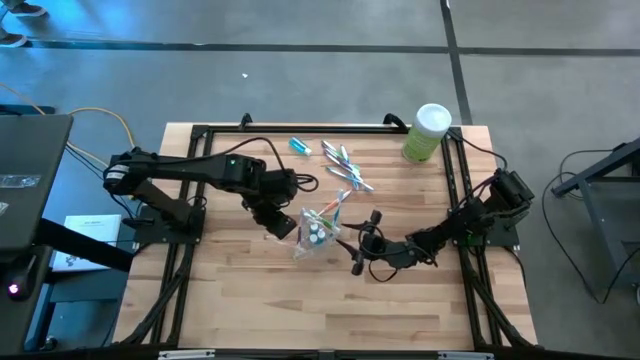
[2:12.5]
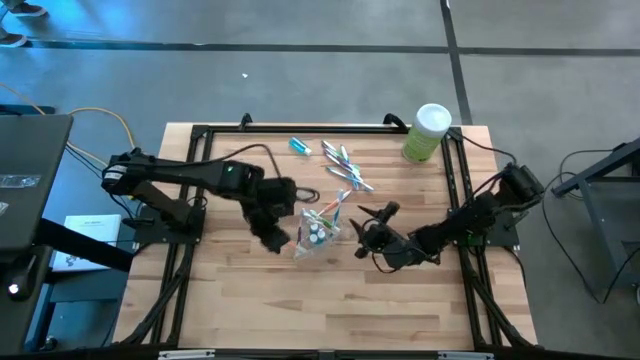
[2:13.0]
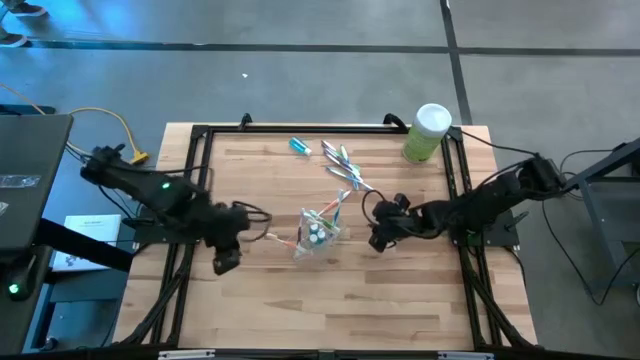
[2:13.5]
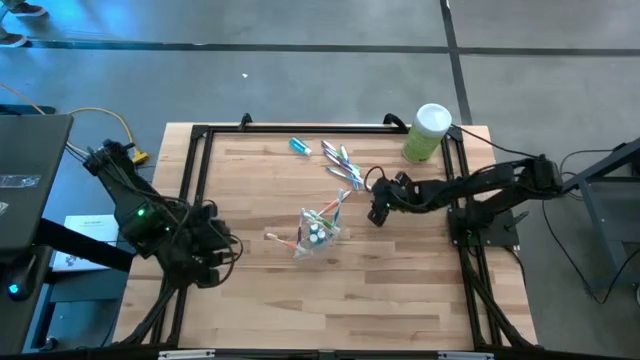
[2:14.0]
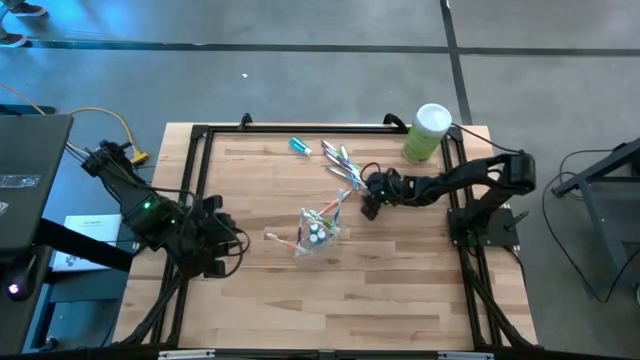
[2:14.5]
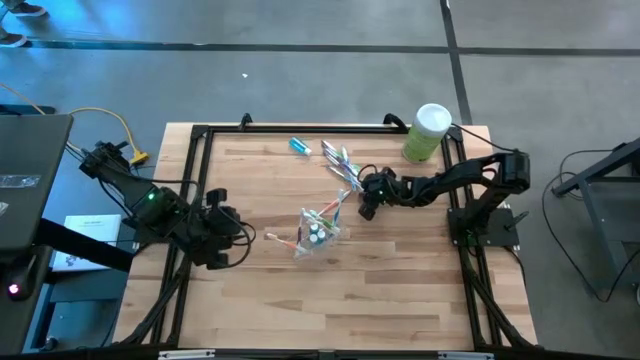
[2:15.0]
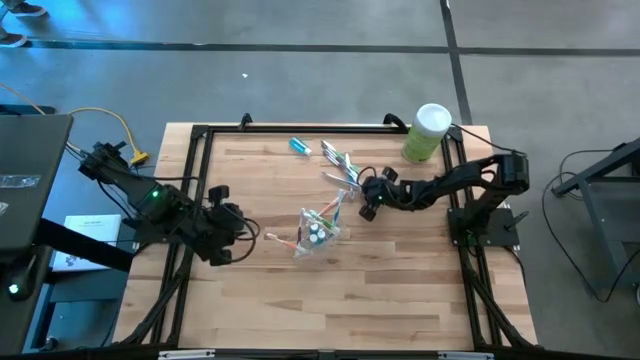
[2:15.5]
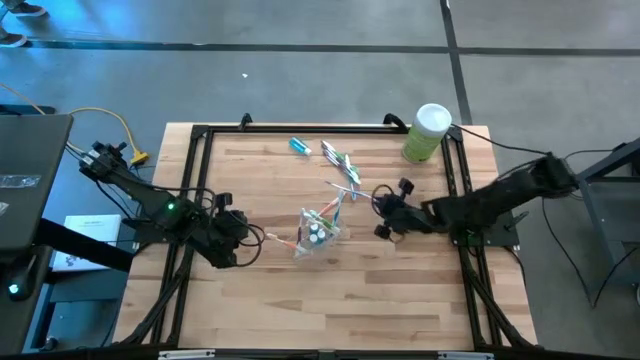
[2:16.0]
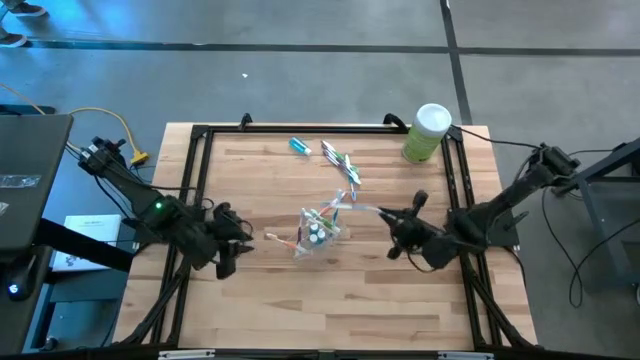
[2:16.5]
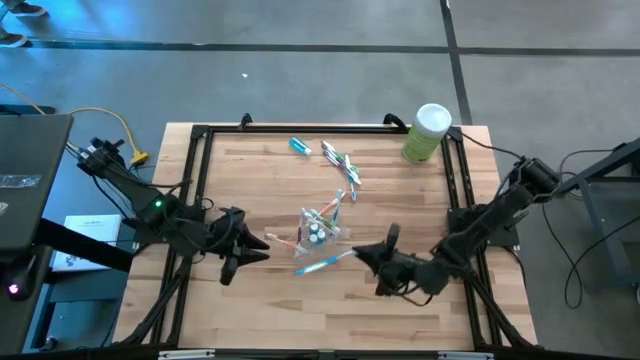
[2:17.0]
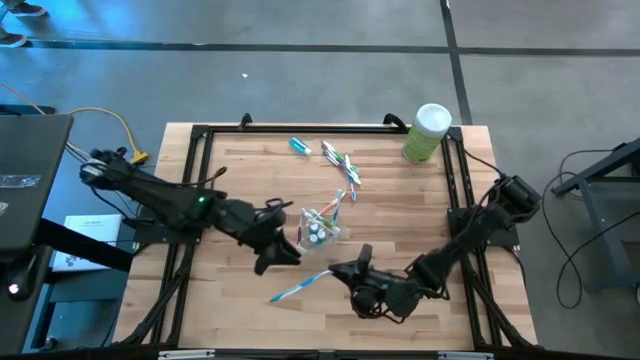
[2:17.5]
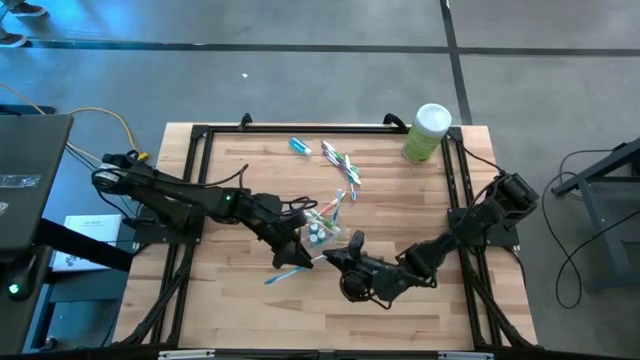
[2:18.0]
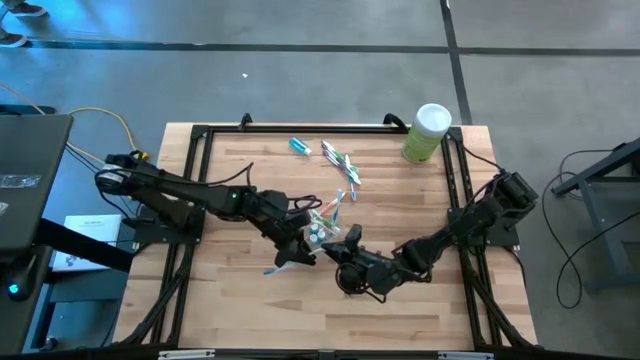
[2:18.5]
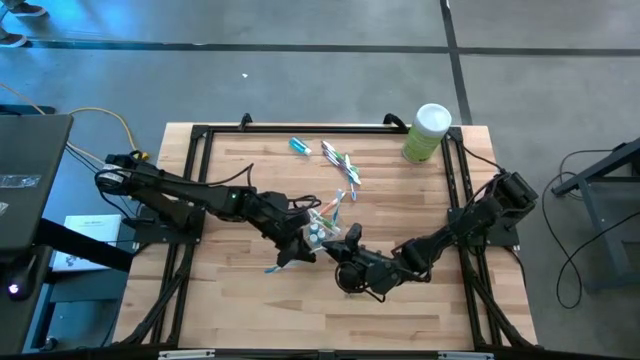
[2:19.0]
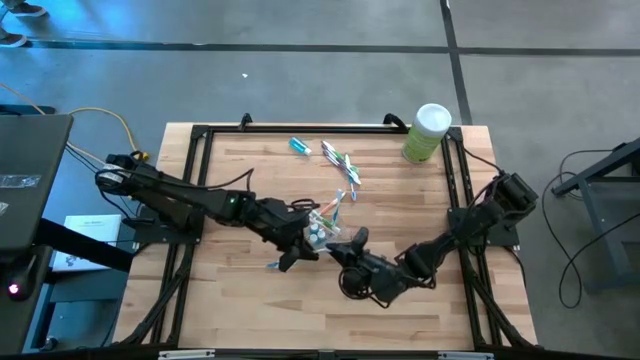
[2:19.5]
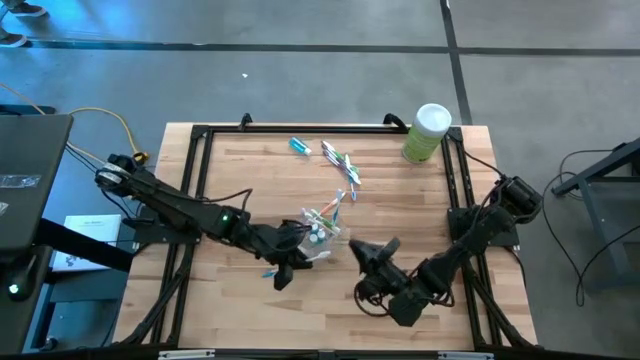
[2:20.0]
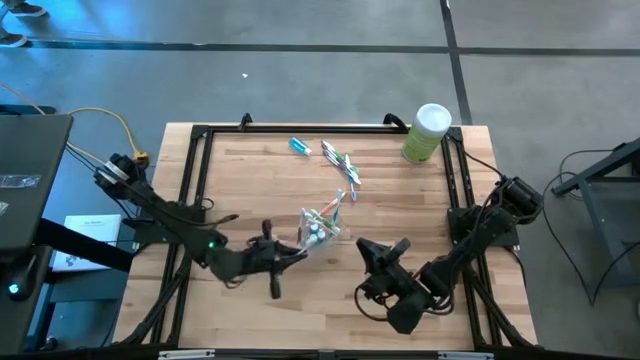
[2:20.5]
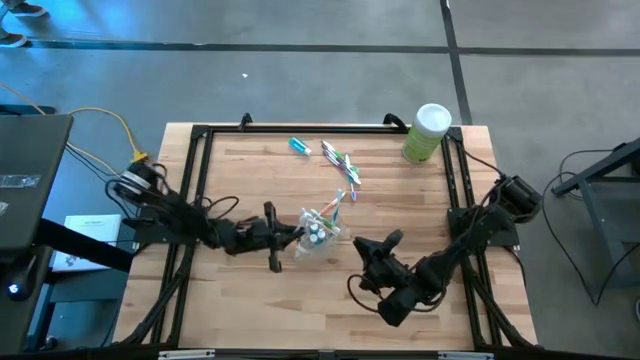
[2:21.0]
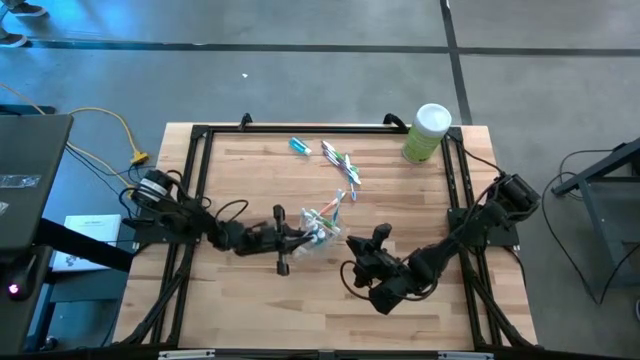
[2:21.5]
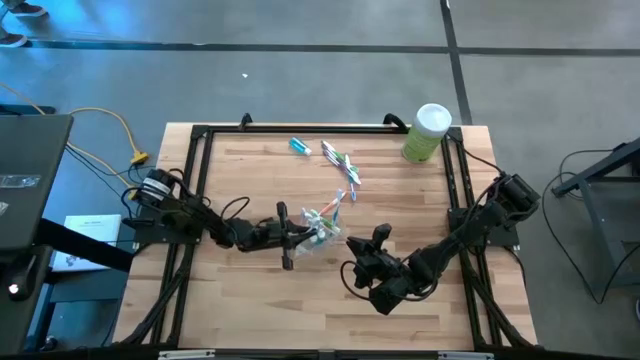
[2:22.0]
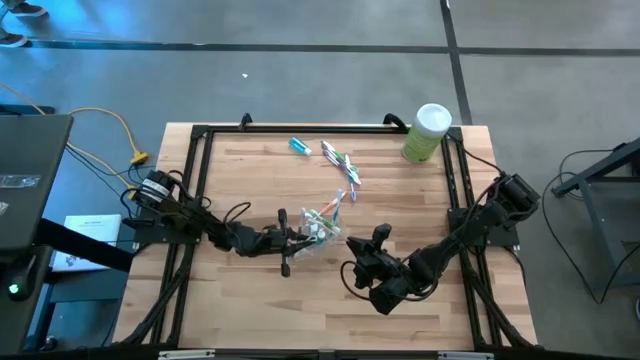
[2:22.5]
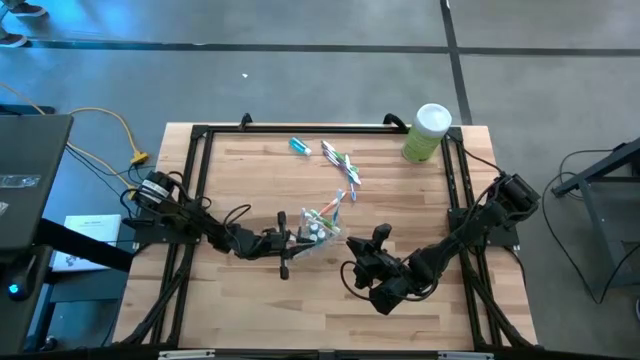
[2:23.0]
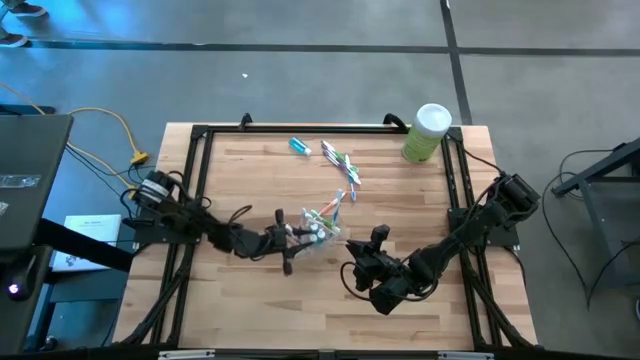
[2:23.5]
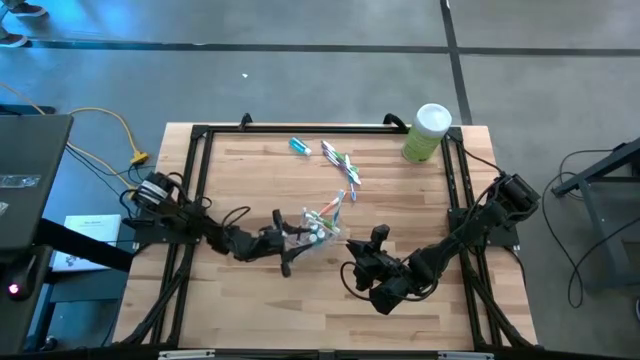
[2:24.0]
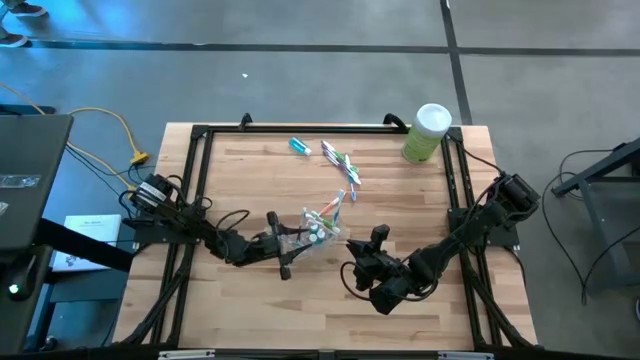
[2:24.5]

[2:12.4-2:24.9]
Task: Pick & Place toothbrushing station
Put the blue toothbrush into the transparent organizer

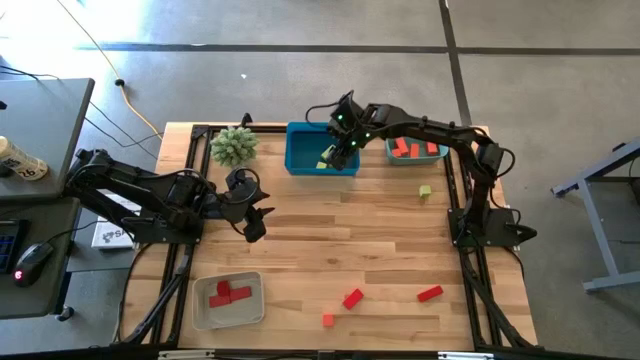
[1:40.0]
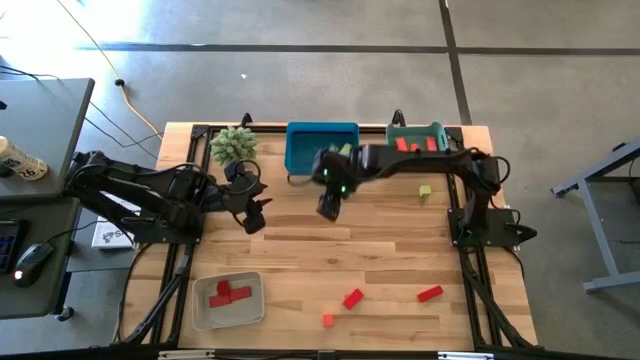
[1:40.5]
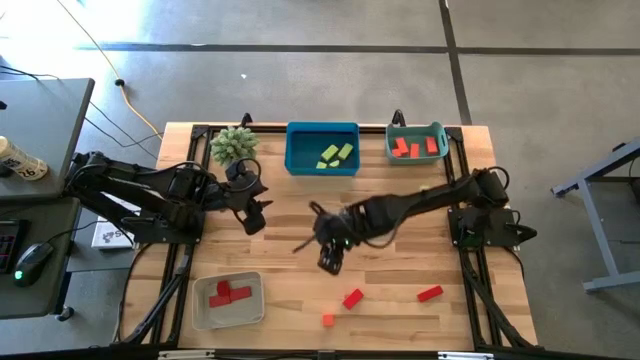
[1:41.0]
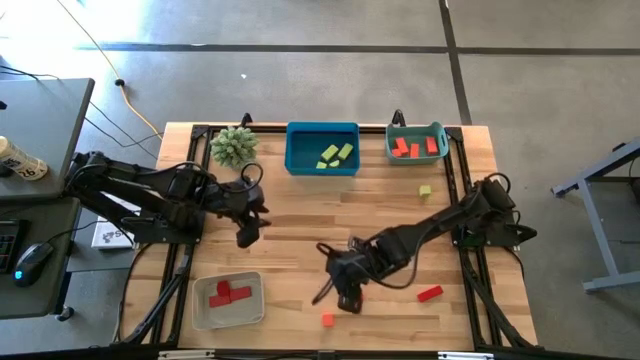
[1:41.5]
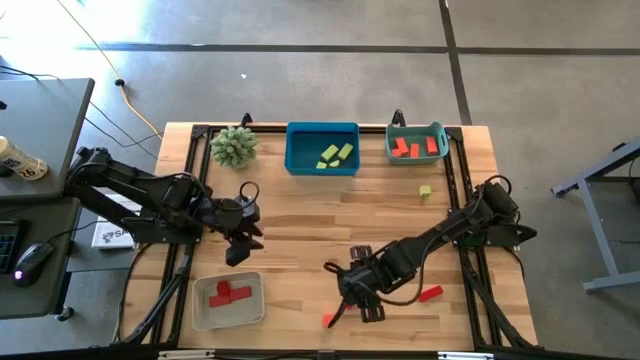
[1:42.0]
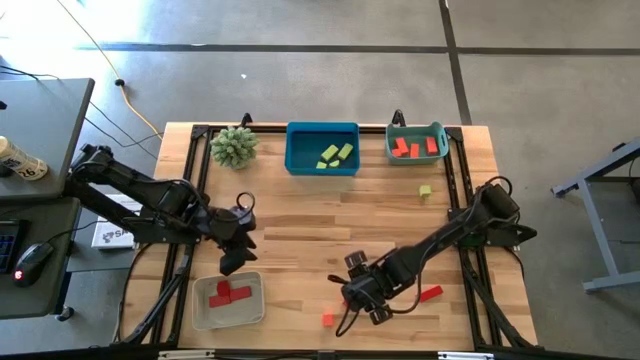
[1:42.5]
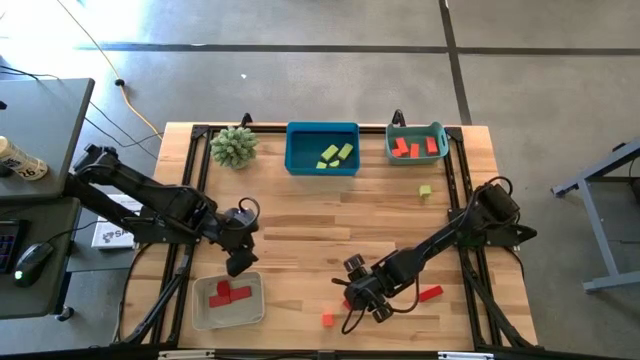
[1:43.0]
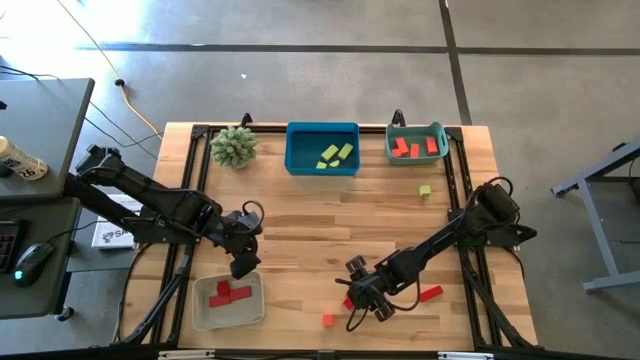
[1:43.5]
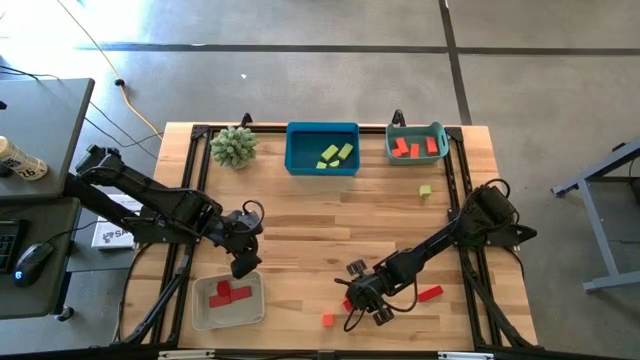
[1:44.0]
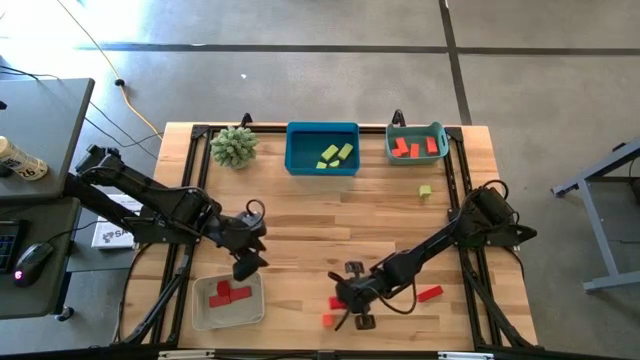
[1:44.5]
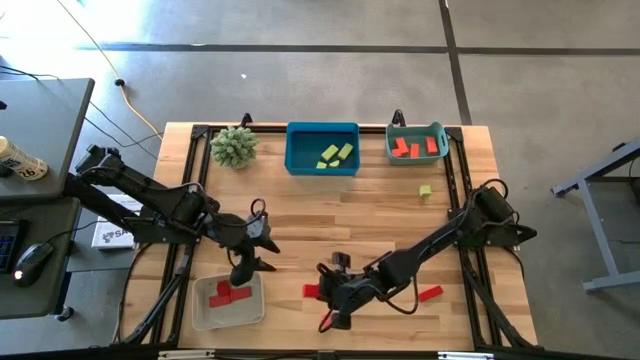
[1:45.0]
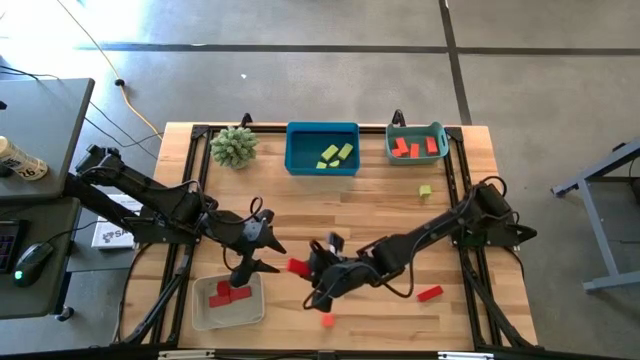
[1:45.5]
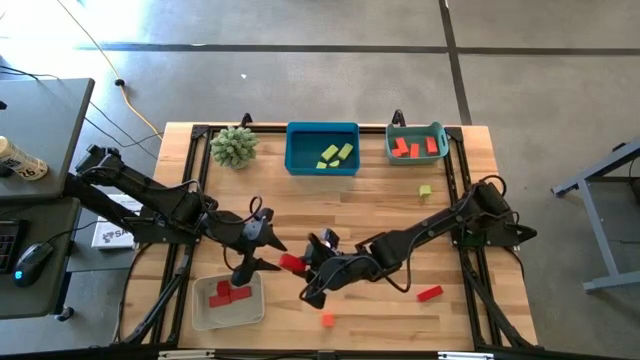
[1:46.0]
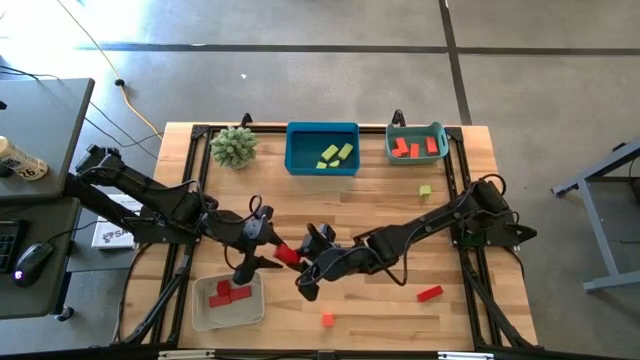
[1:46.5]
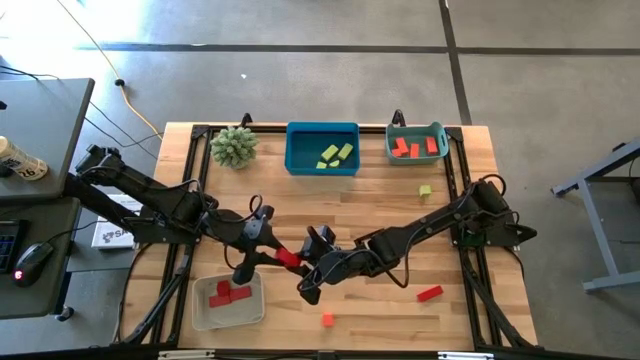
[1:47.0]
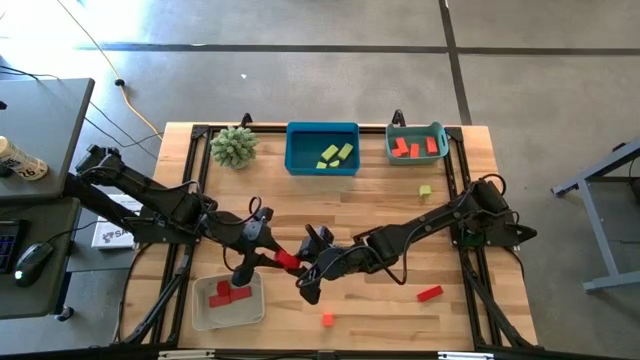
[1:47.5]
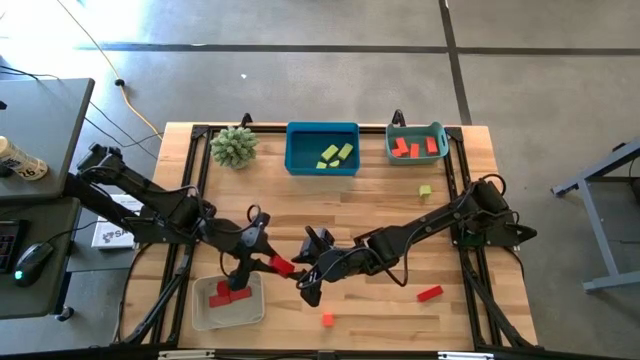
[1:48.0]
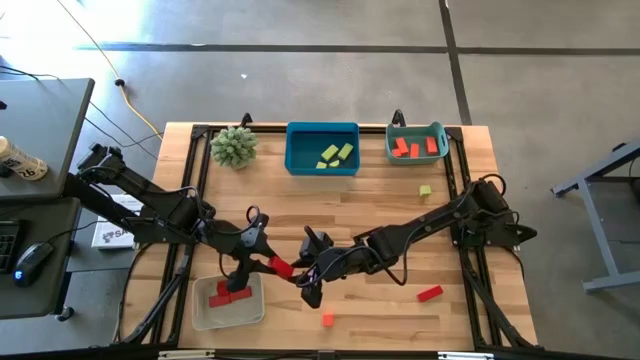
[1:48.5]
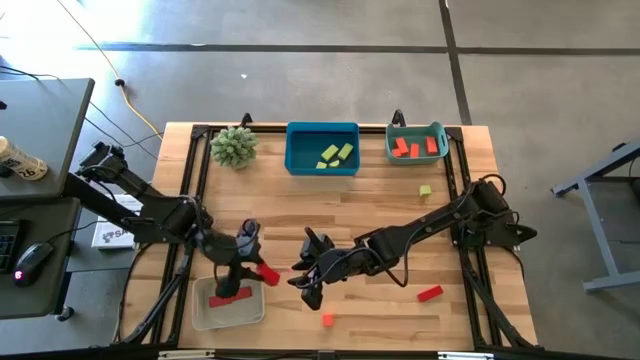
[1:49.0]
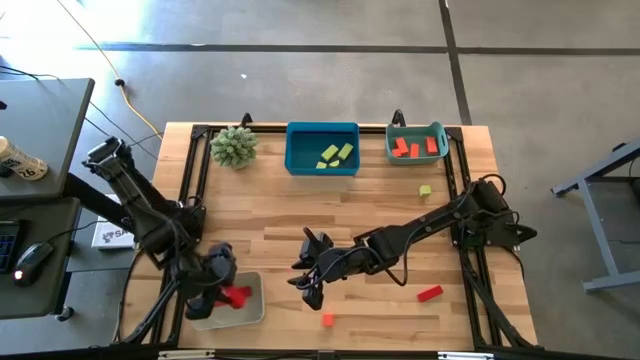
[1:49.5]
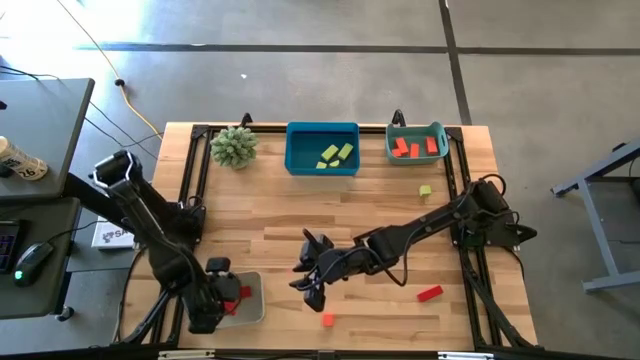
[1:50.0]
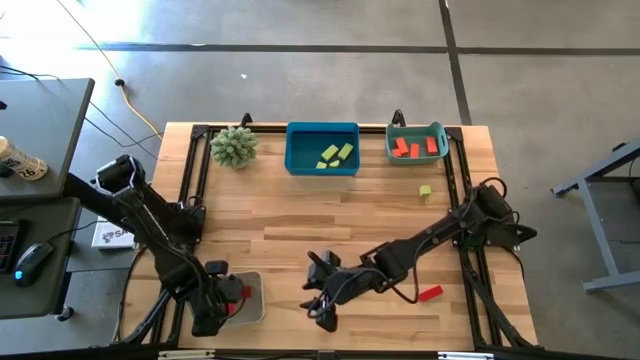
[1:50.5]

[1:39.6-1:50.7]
Task: Sort & place blocks by color
Put the red block into the gray bin
